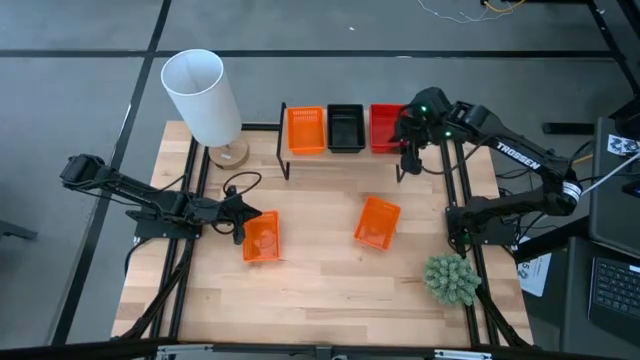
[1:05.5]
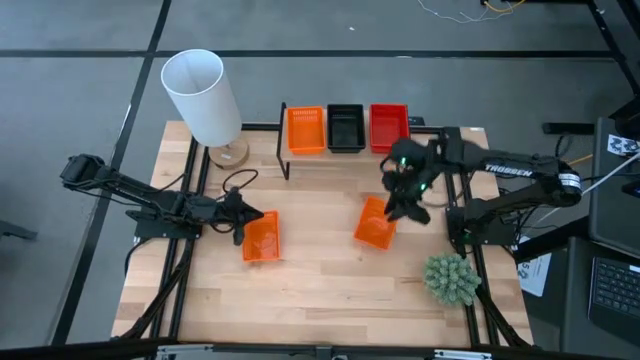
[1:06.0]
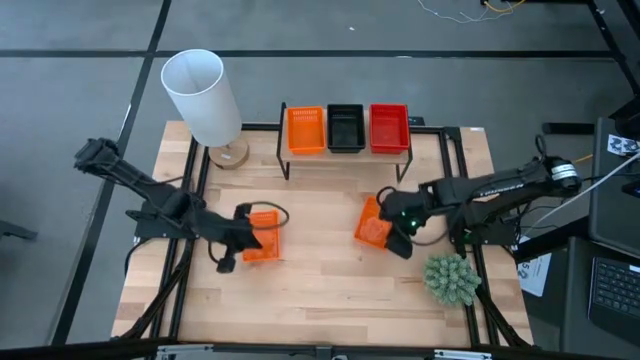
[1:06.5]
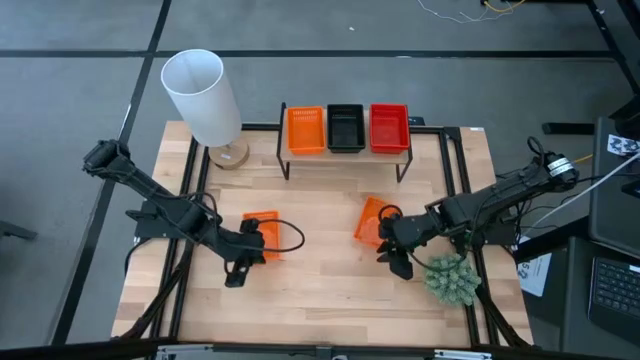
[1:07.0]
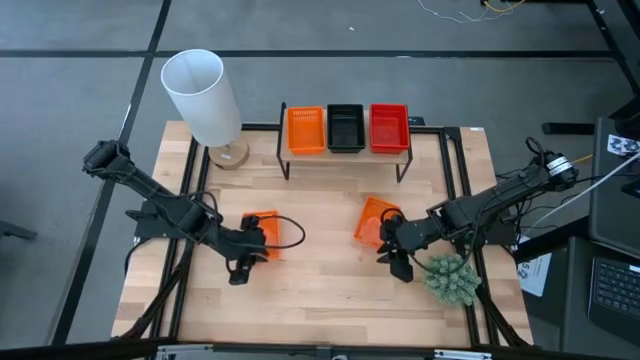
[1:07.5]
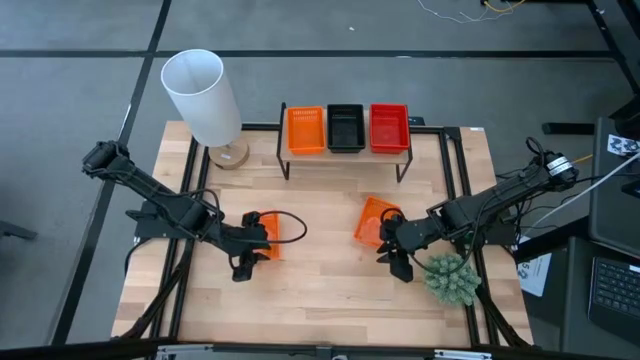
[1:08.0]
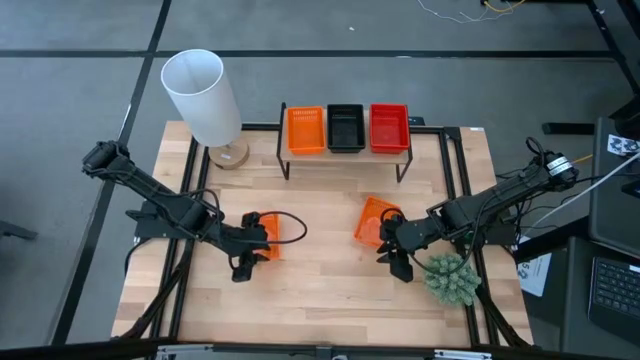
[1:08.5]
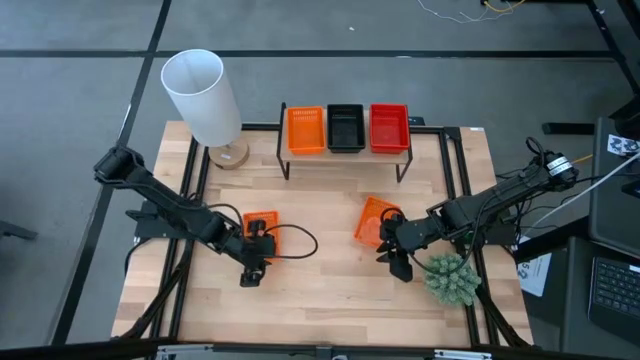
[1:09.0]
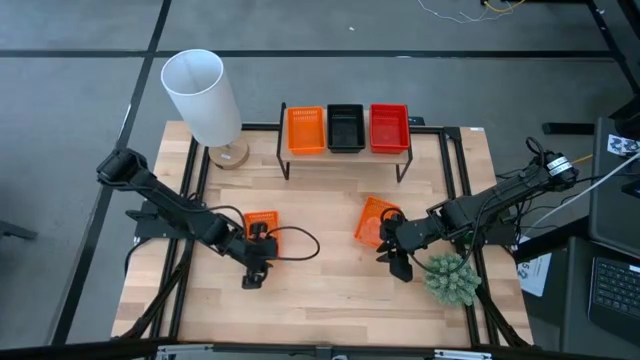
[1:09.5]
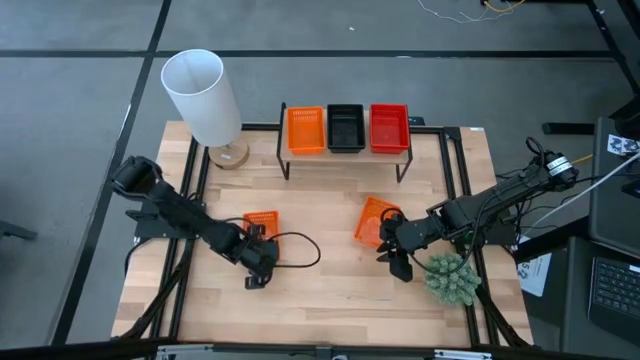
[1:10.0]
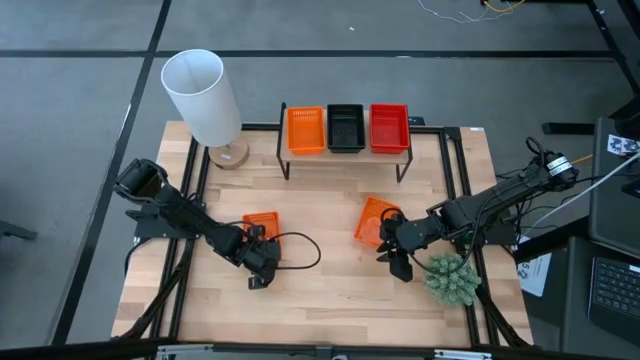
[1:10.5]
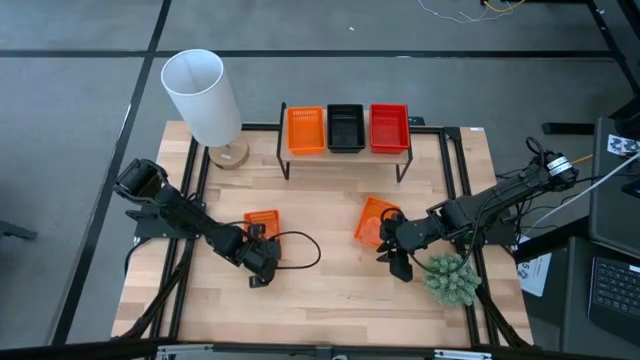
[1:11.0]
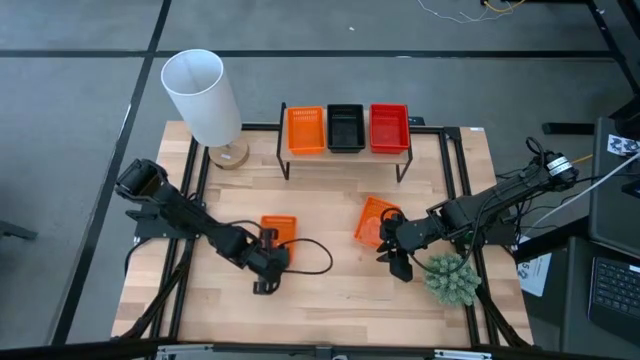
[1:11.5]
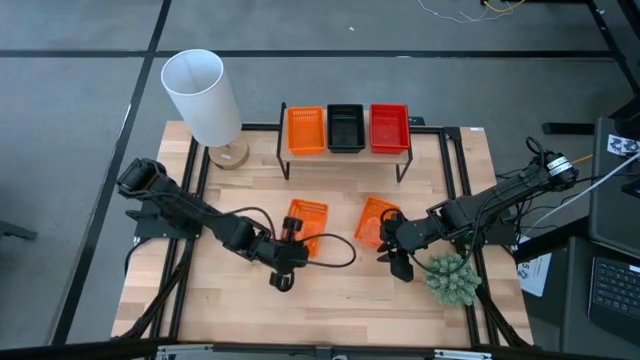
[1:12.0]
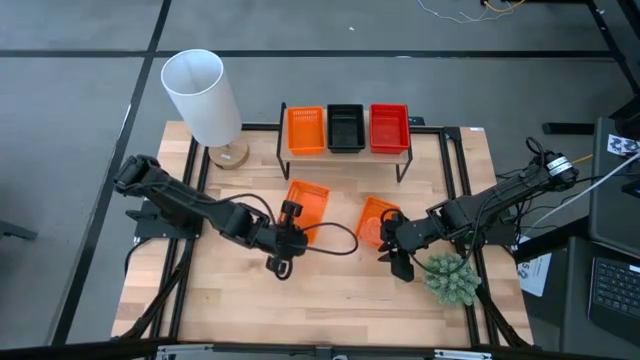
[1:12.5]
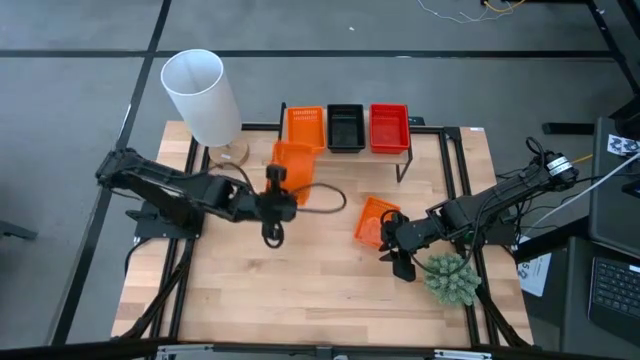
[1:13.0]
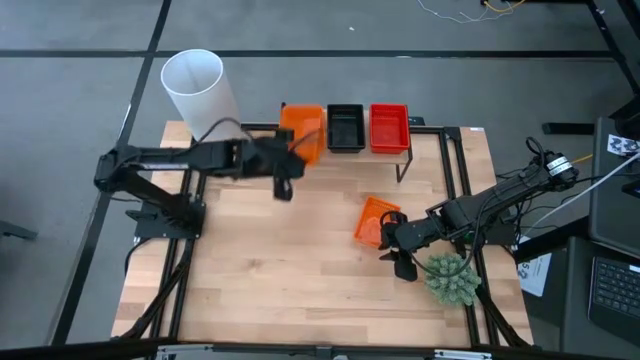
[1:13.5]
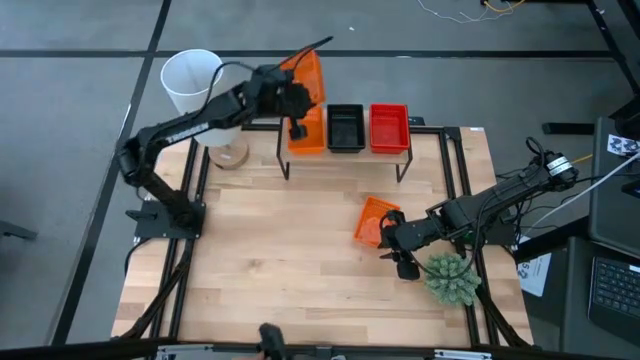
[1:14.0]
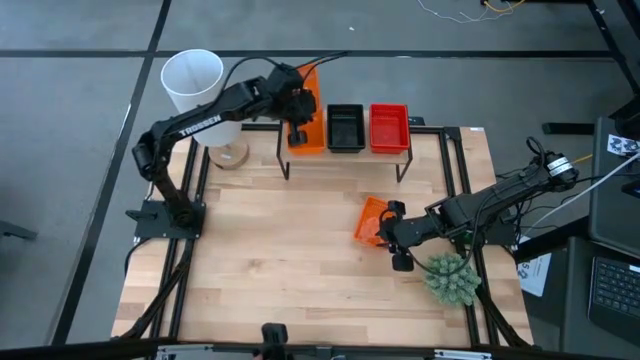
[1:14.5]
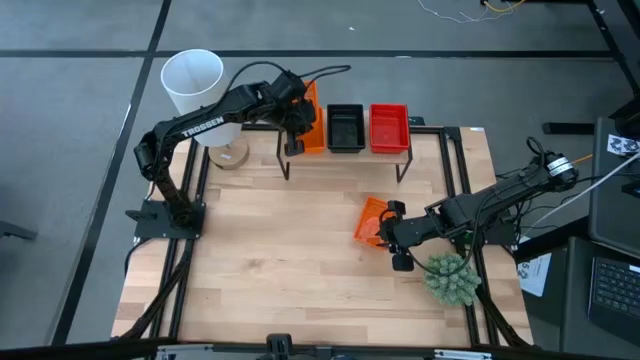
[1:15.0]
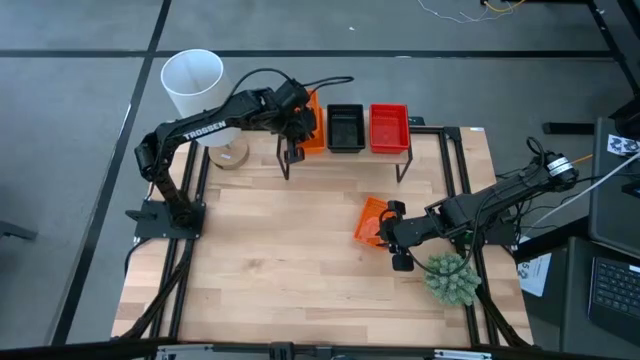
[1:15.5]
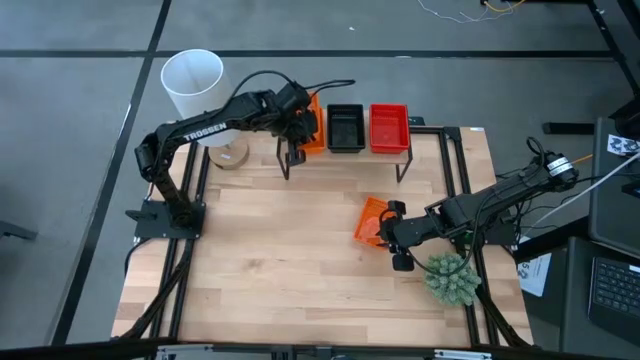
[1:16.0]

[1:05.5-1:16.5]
Task: Stack baskets on shelf by color
Stack the bottom left orange basket on the orange basket on the top shelf

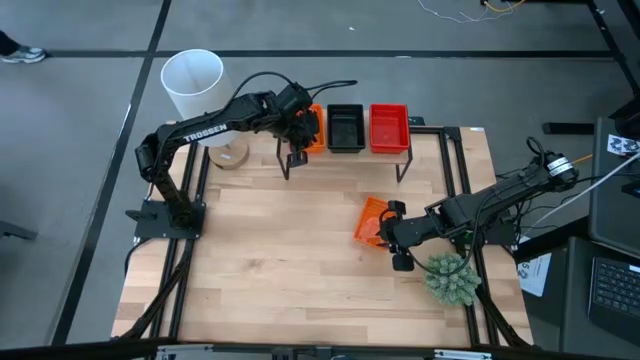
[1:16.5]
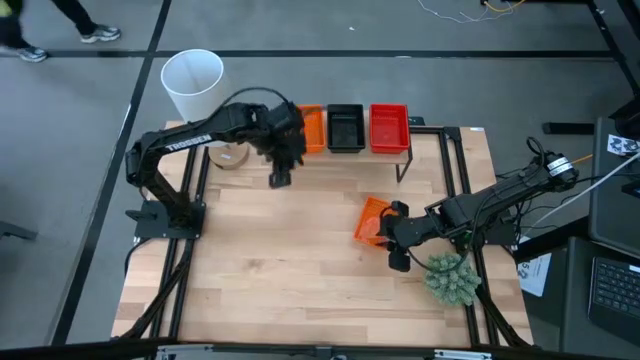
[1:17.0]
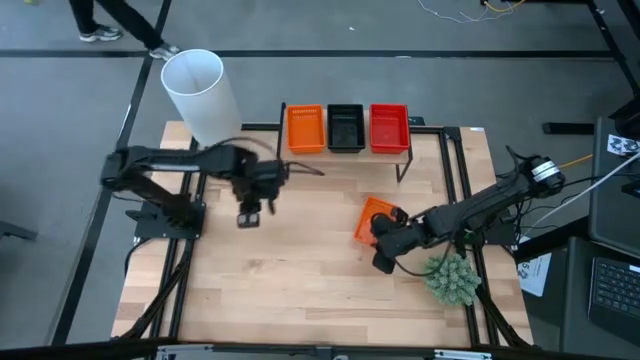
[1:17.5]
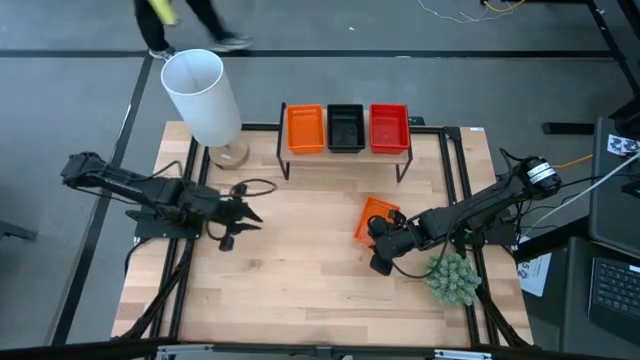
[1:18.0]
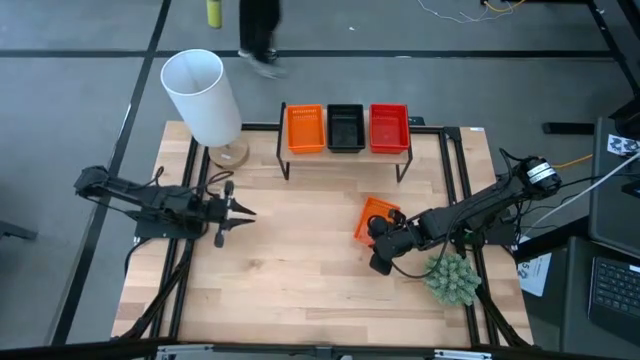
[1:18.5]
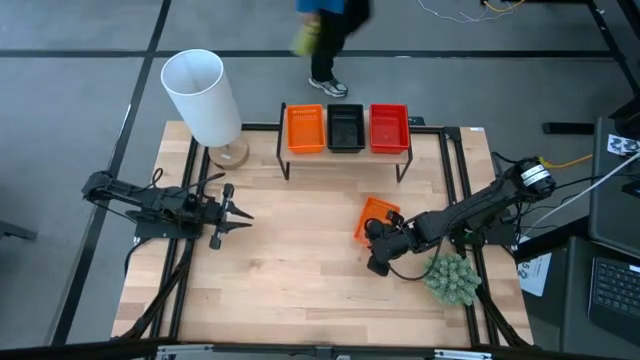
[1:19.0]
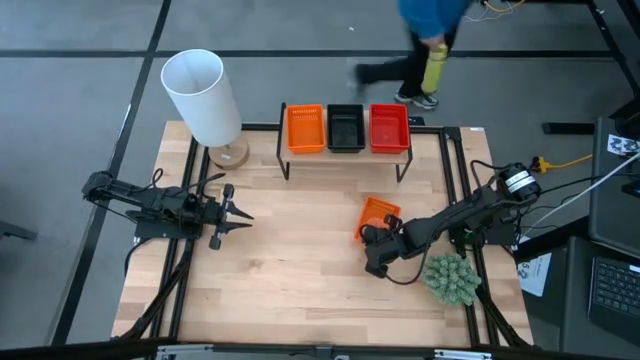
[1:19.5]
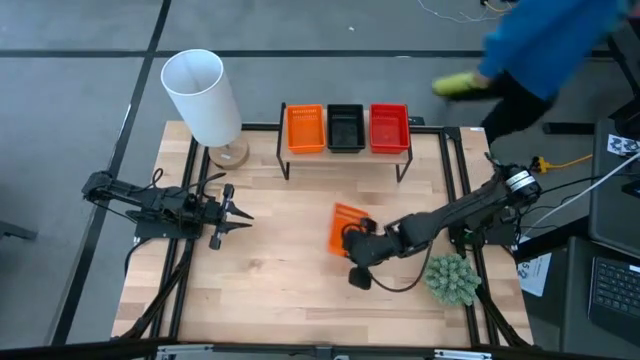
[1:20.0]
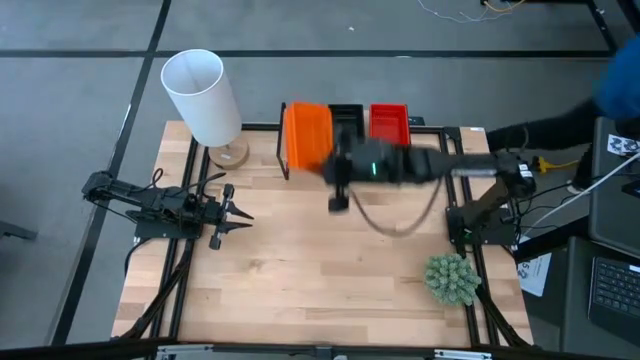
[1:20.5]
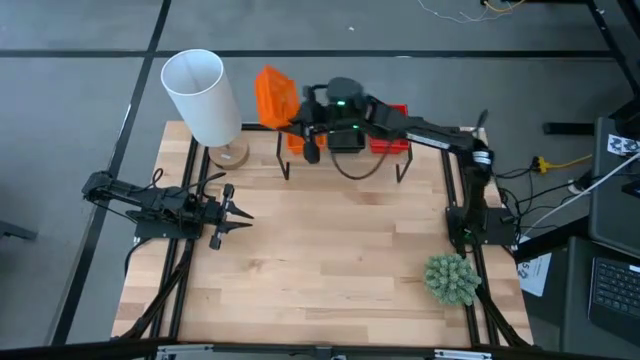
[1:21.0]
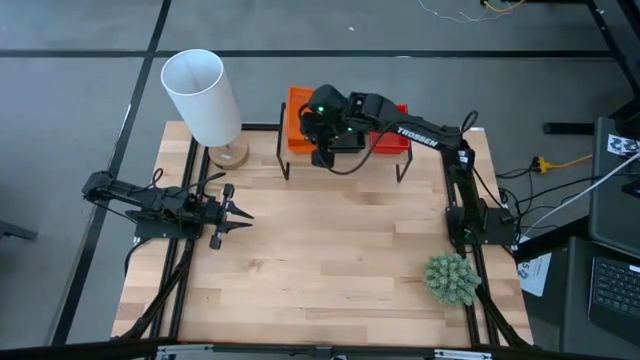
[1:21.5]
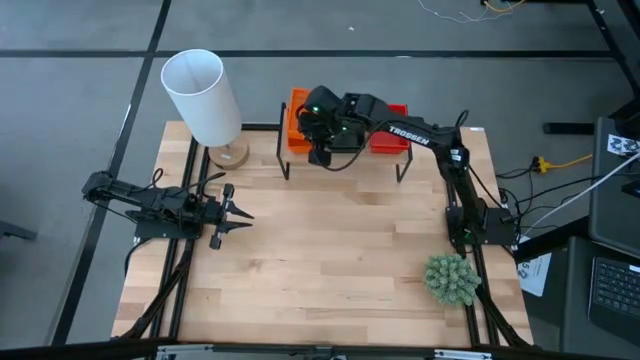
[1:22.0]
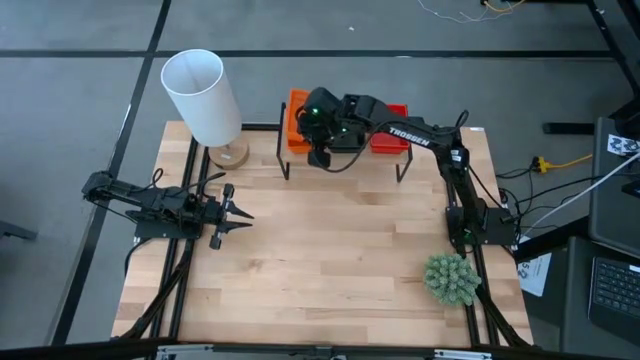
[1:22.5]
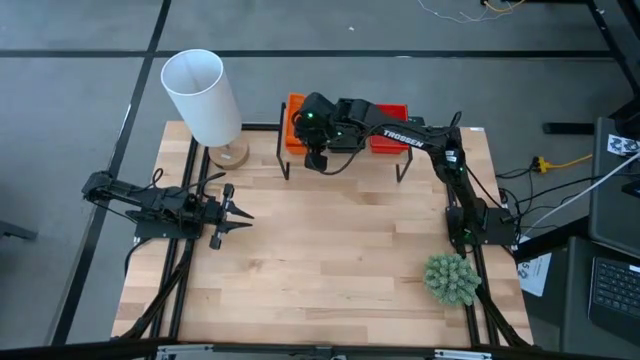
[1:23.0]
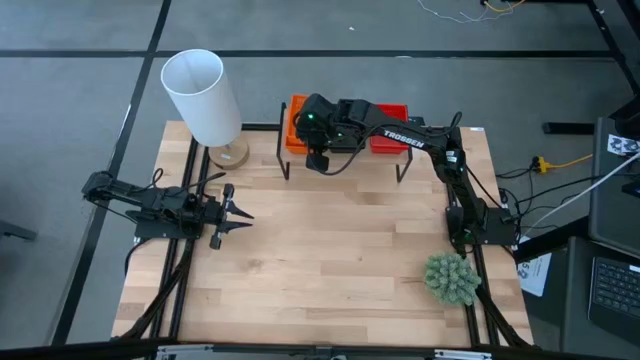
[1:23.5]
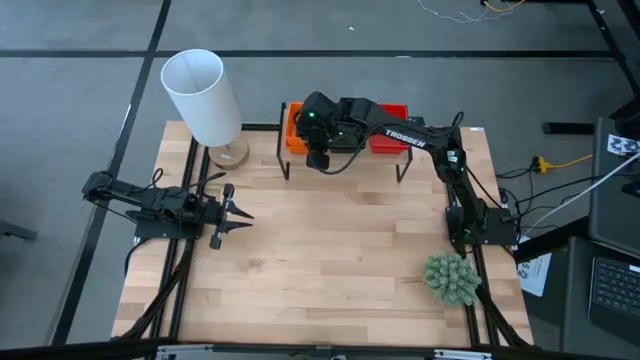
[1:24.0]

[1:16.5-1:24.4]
Stack the orange basket on the orange basket on the top shelf

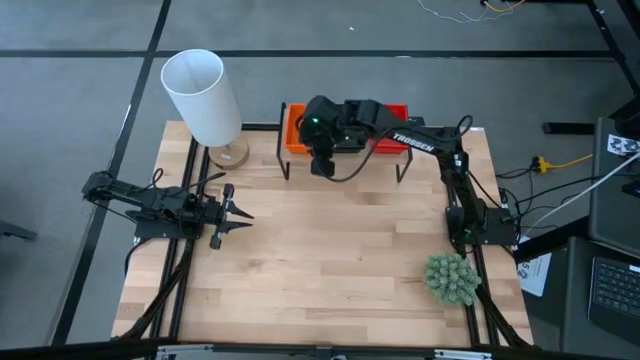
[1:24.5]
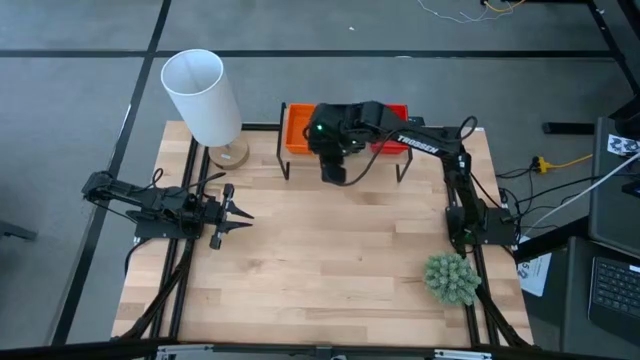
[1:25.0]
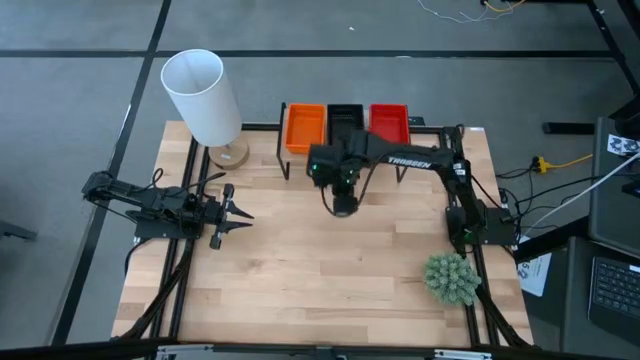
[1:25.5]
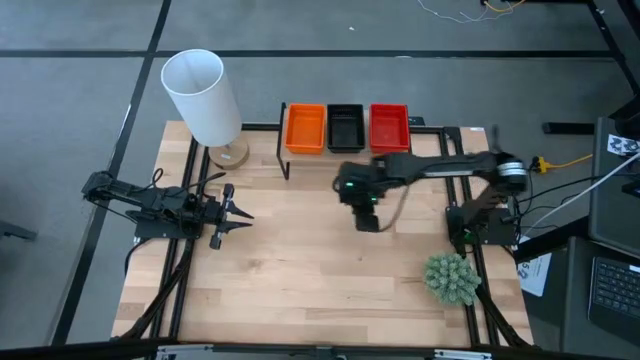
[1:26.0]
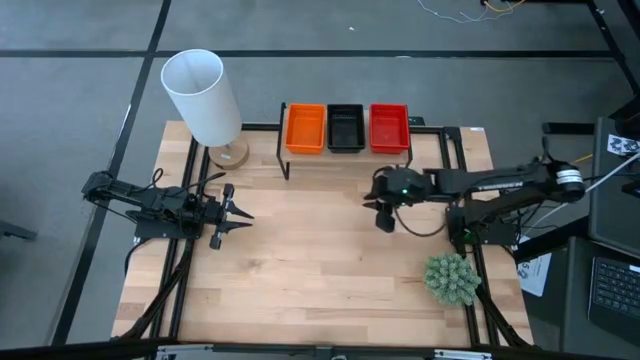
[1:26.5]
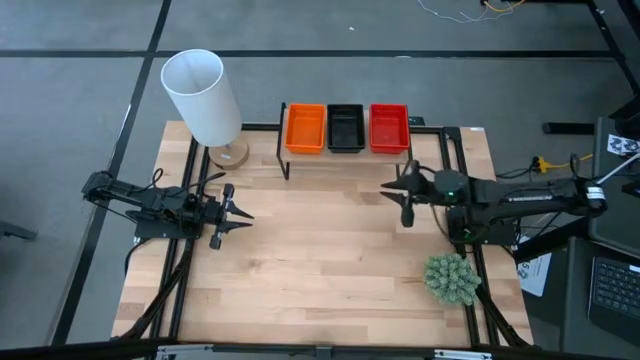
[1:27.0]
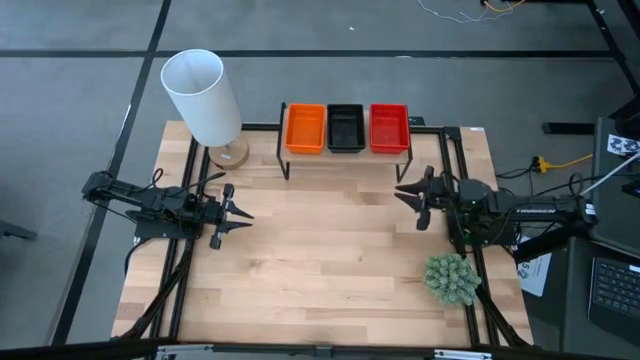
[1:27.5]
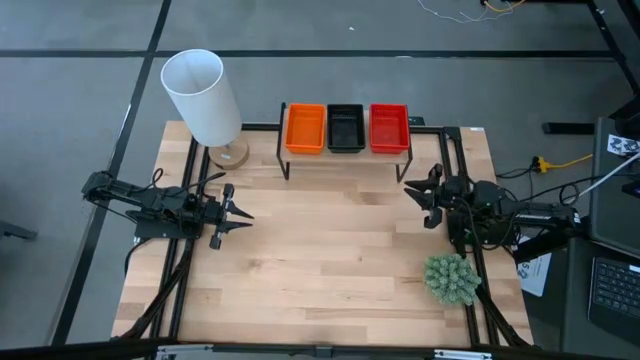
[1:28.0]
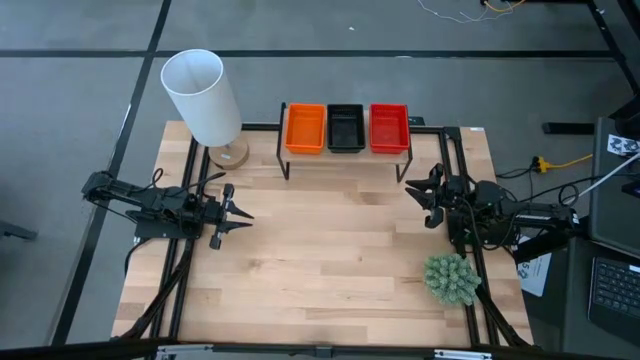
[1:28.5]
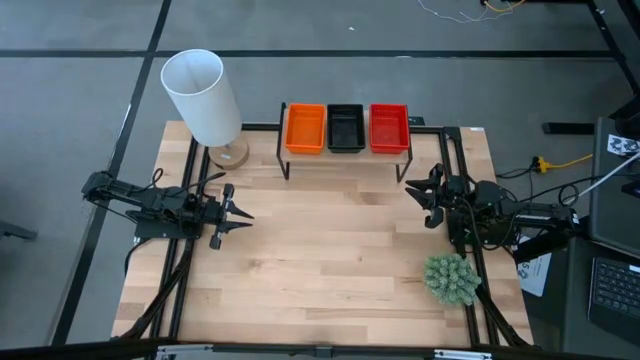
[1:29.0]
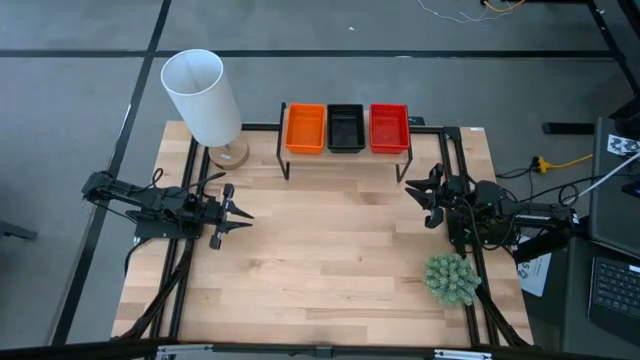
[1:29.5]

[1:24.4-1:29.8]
Return to Home Position
